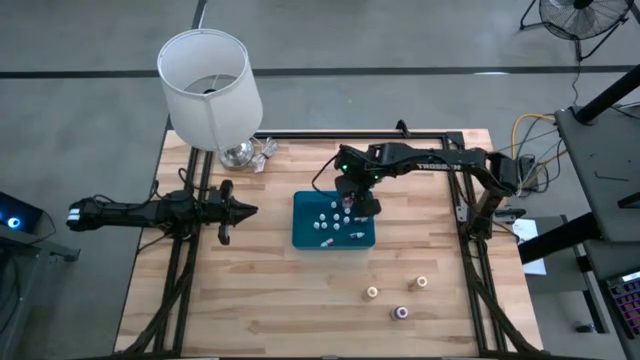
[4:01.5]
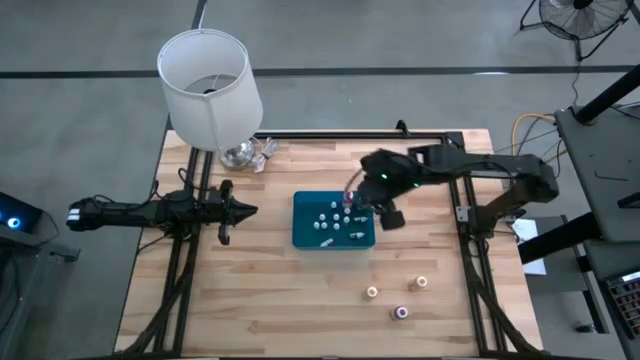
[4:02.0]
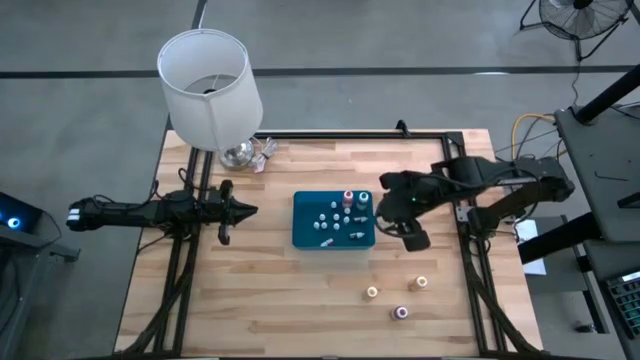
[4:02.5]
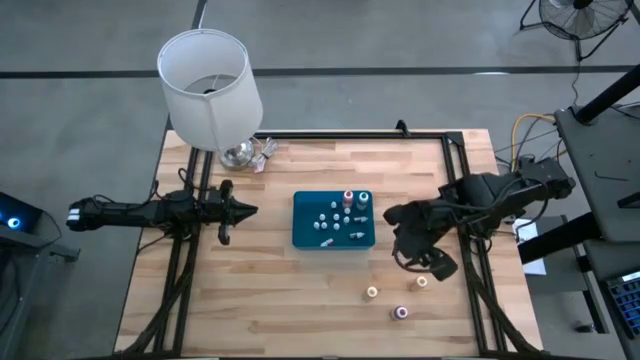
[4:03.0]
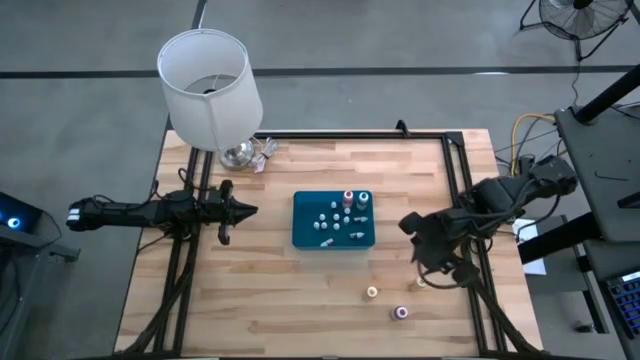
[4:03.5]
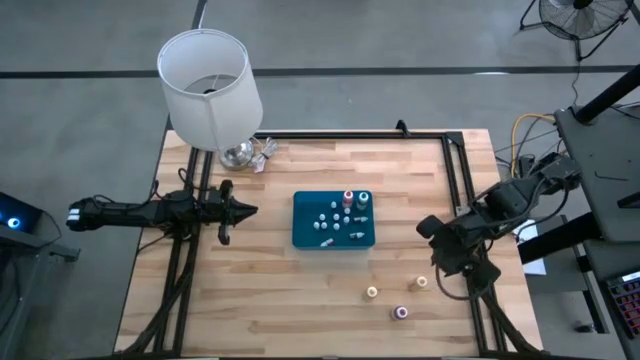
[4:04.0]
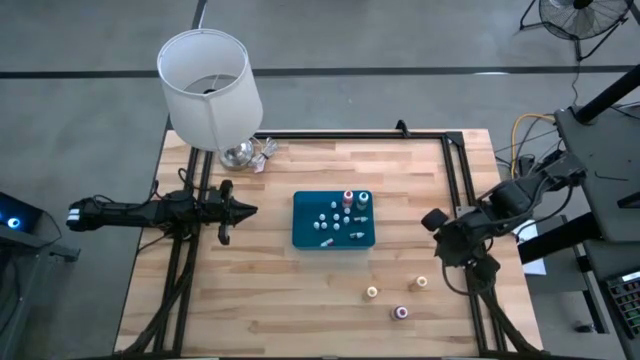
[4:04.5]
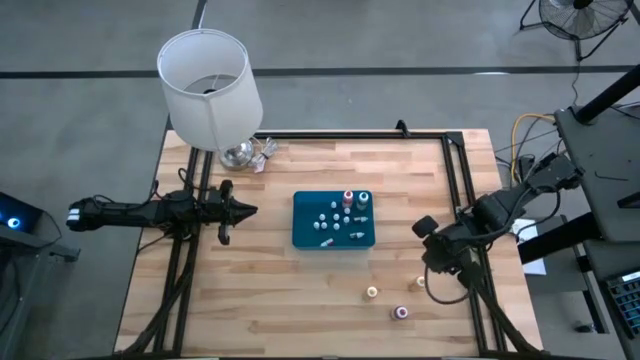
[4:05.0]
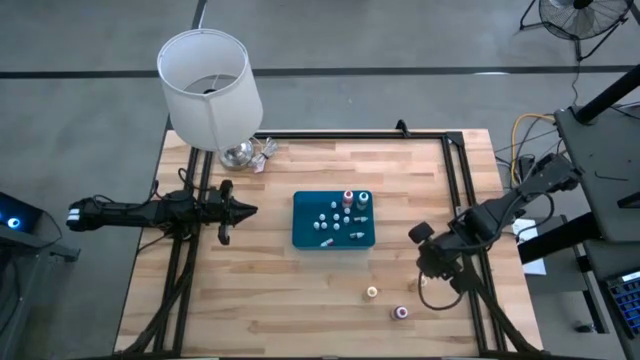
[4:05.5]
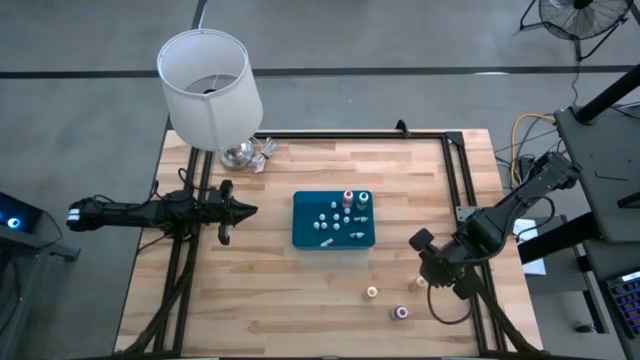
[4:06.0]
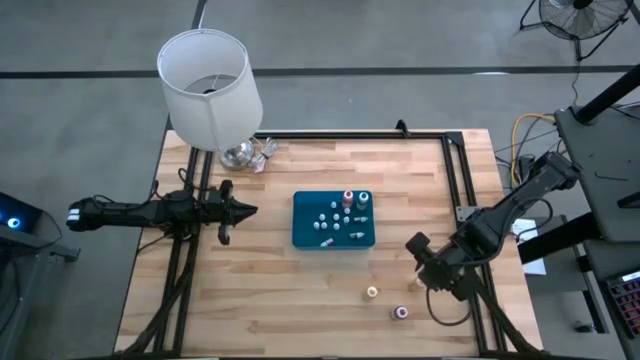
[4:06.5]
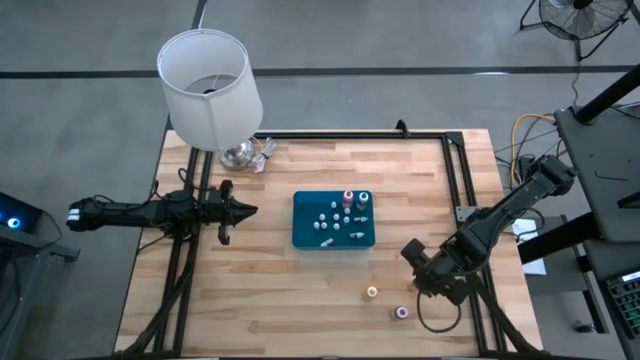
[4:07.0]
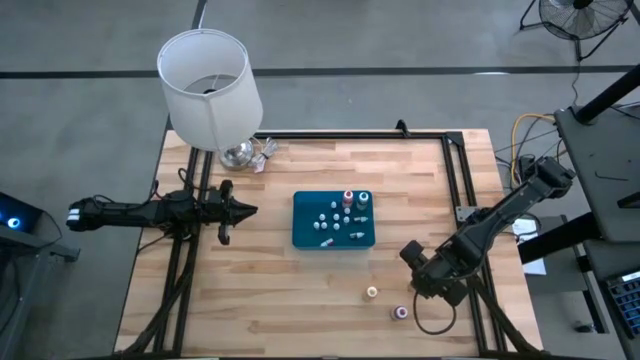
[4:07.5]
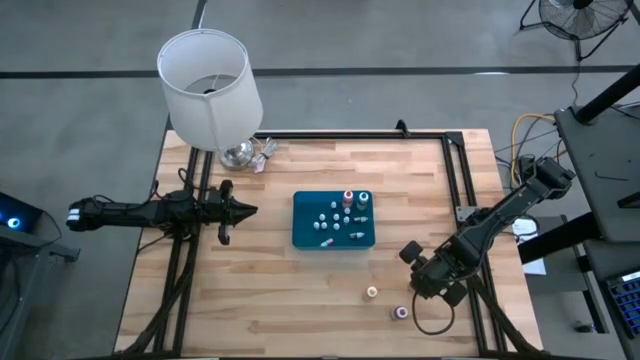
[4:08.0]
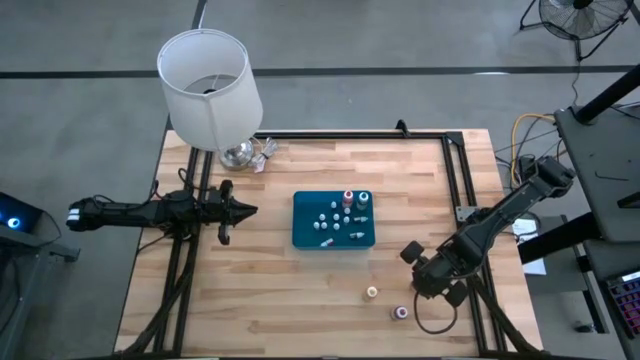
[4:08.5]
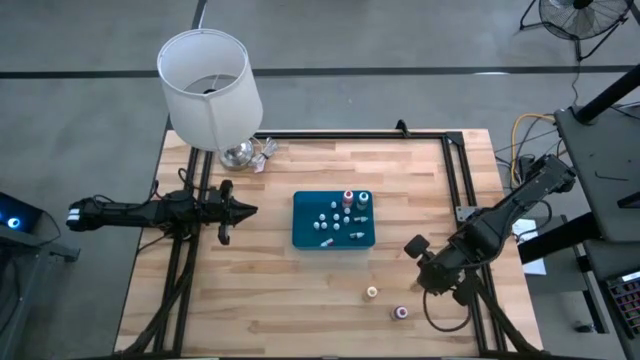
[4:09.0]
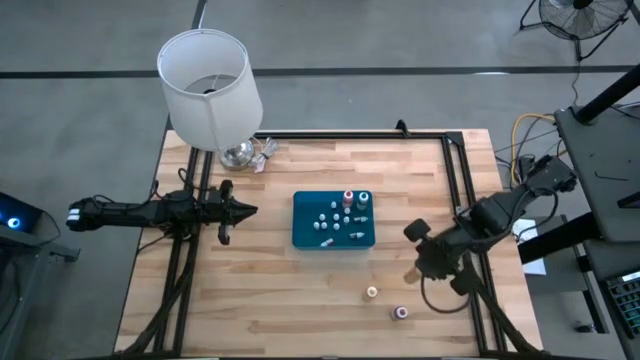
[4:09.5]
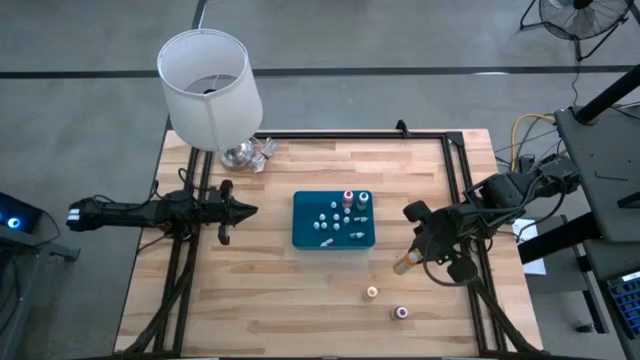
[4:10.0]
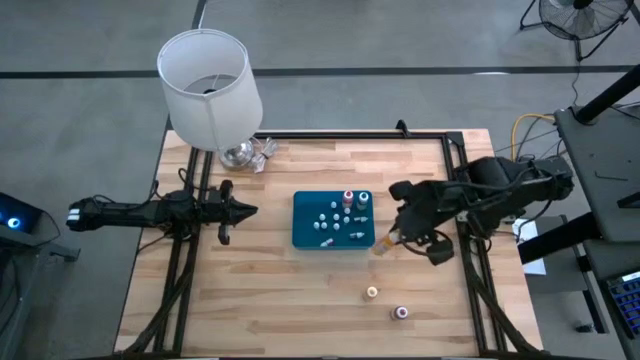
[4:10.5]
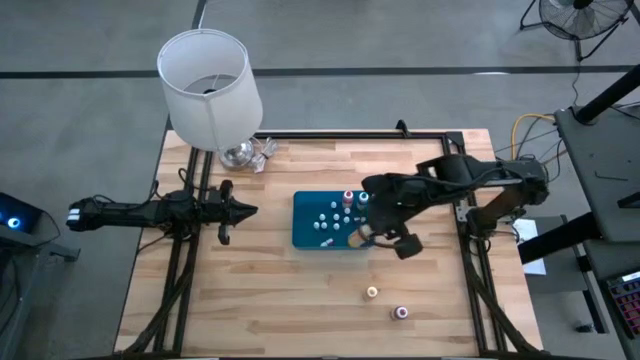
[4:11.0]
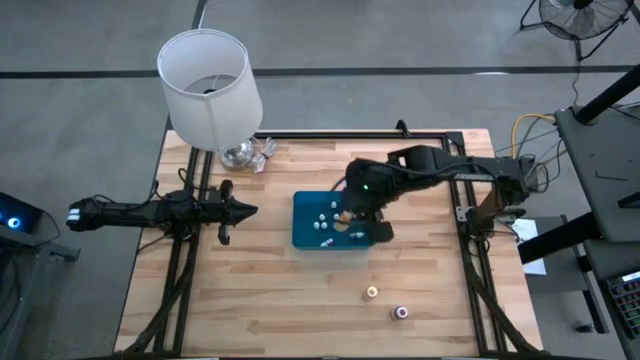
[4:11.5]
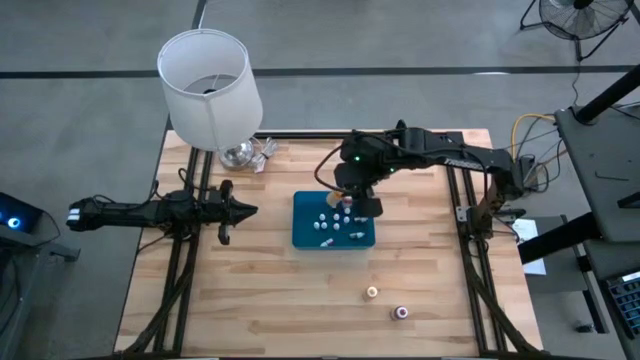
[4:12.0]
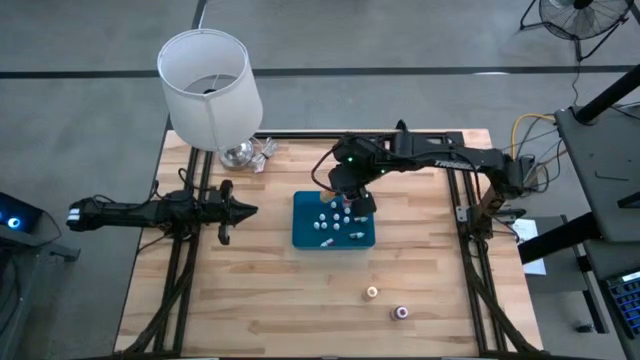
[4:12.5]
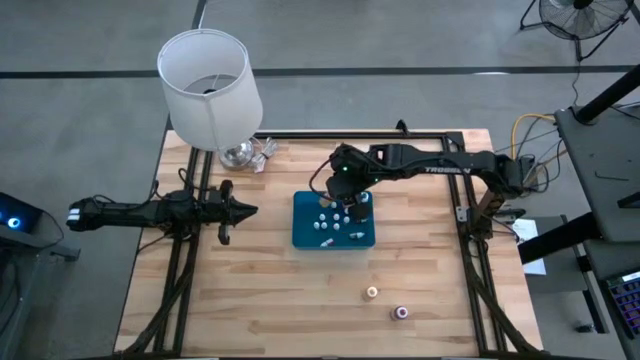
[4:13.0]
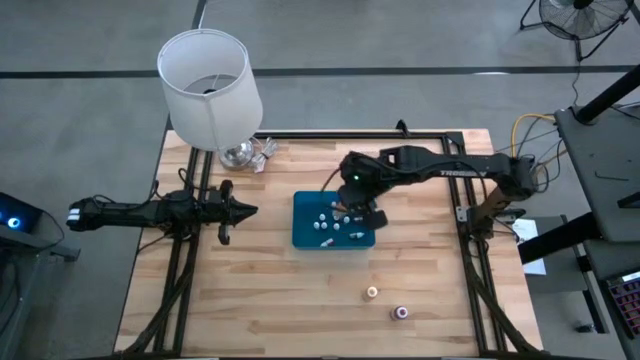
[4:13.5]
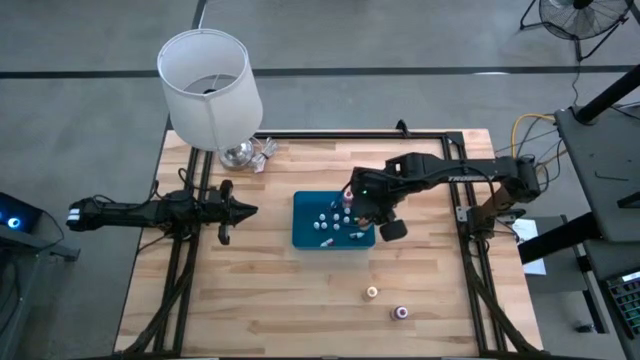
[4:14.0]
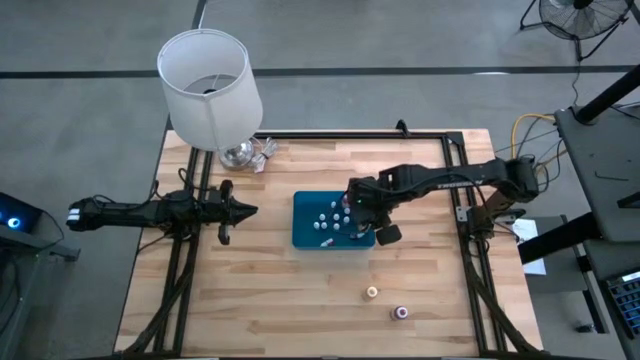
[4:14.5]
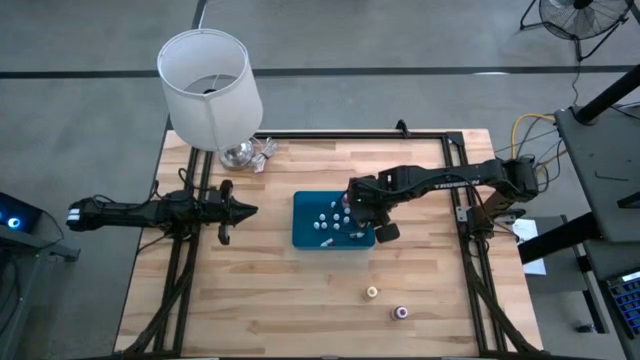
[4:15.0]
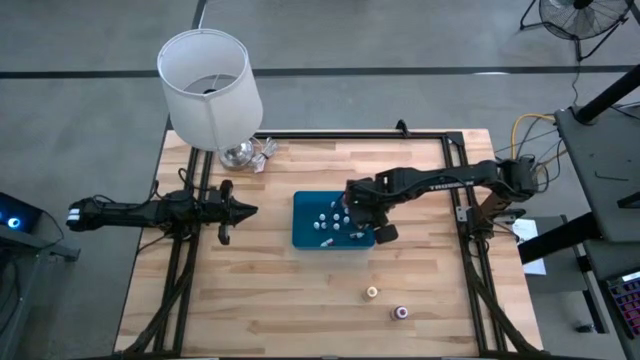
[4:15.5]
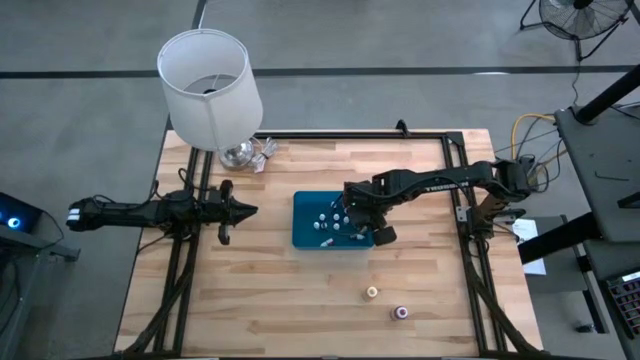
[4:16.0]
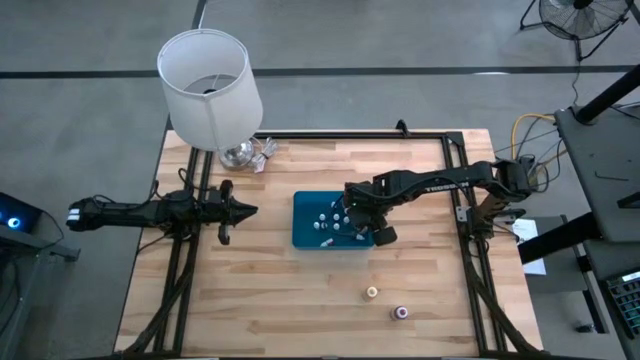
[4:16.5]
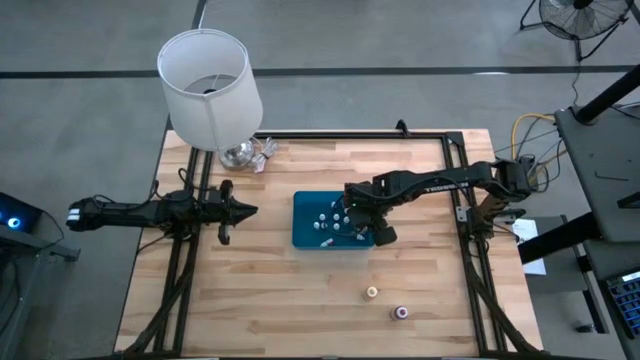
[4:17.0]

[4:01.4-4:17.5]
Task: Pick & Place food coloring
Put the right large yellow bottle into the blue bin

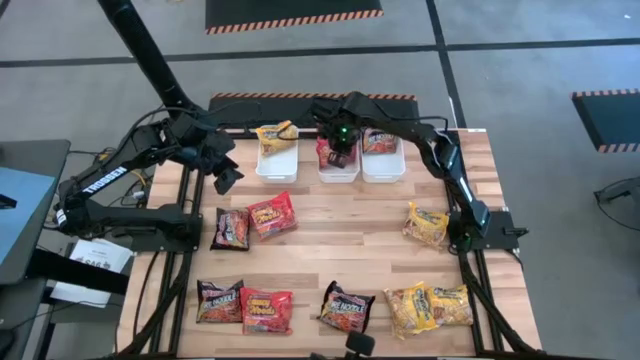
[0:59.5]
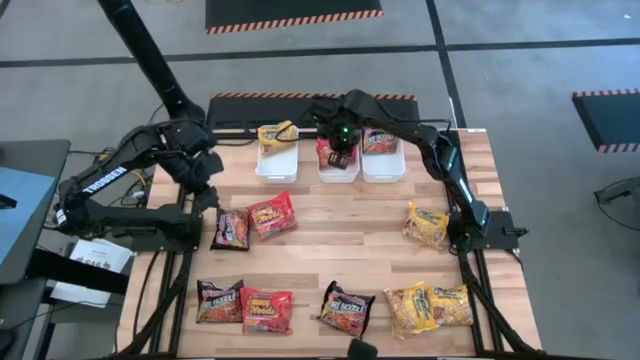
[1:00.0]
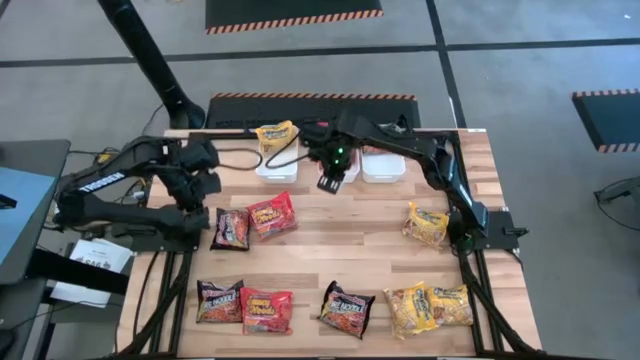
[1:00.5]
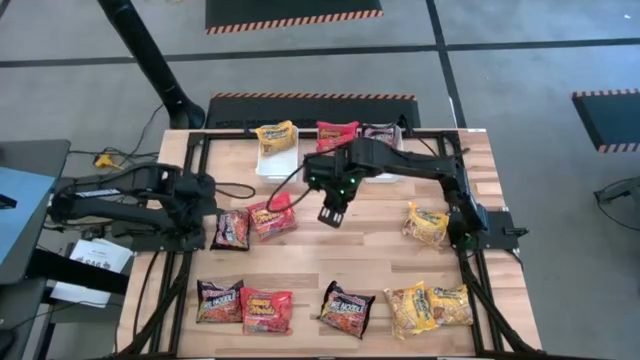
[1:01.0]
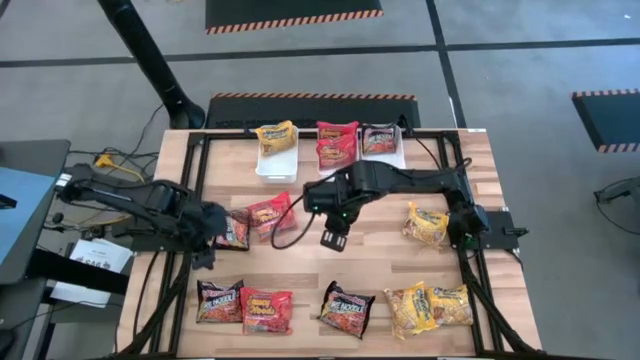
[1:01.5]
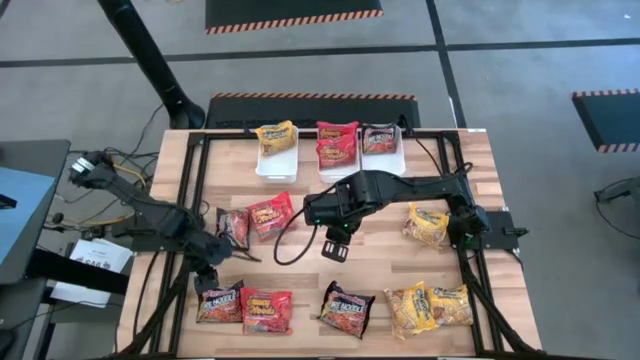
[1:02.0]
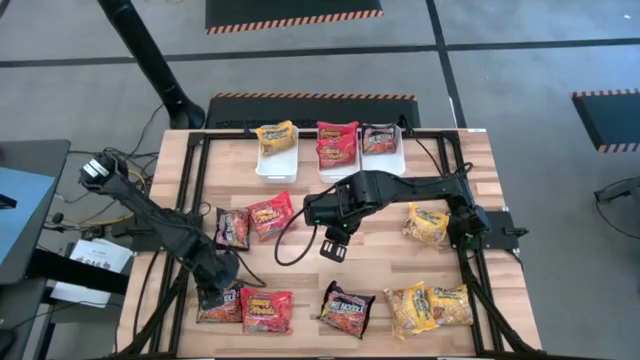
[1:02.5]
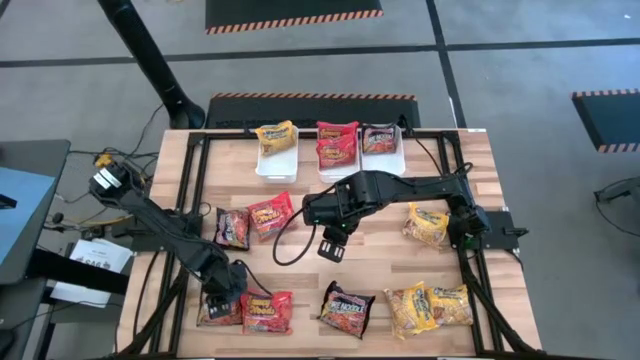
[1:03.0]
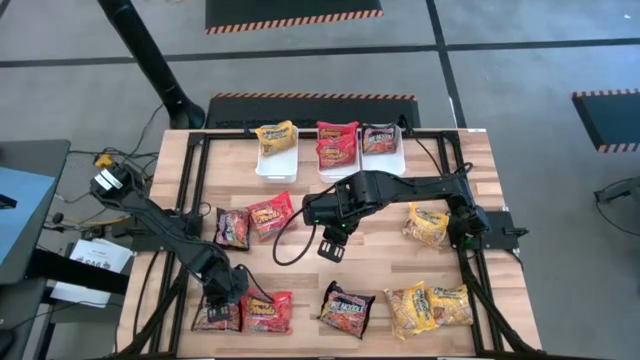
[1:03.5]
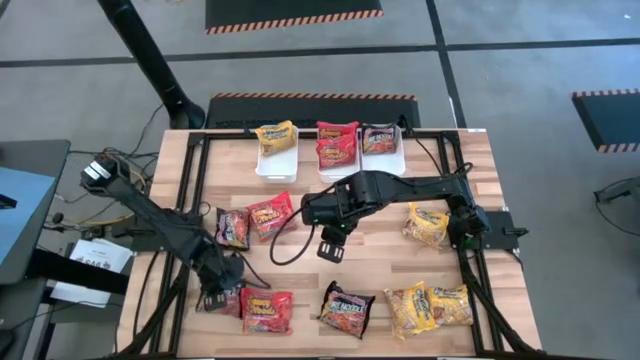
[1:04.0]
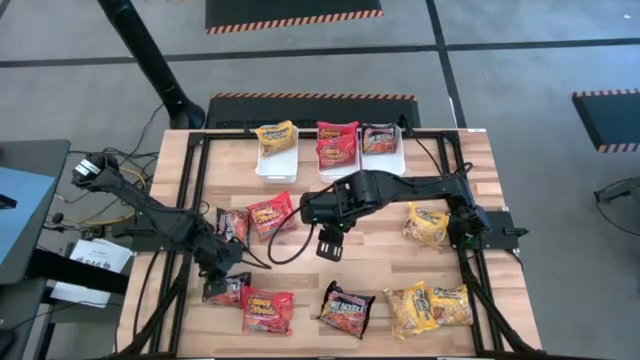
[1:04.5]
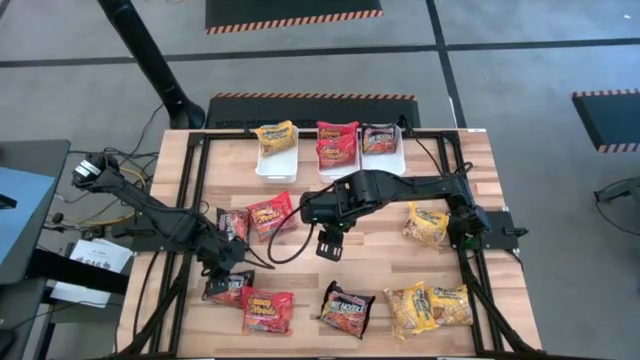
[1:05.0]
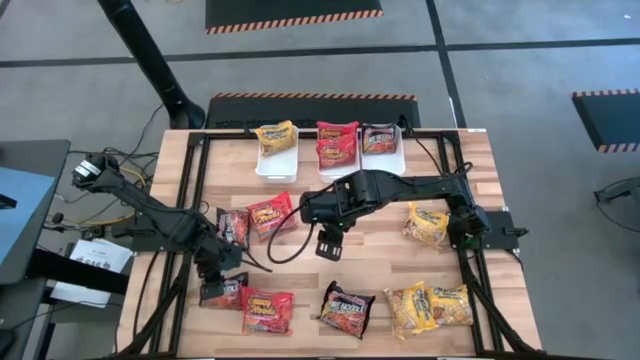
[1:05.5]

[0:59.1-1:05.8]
Task: Sort Maruchan noodles
Put the black noodle pack into the right white bin
